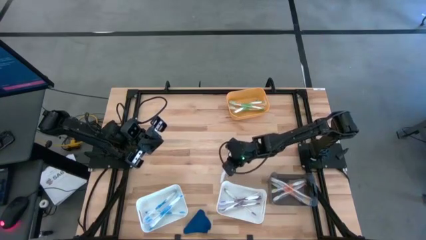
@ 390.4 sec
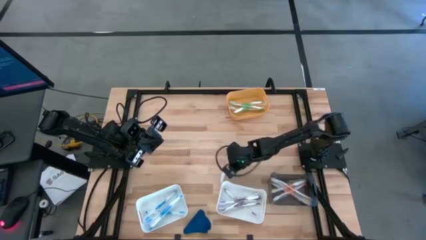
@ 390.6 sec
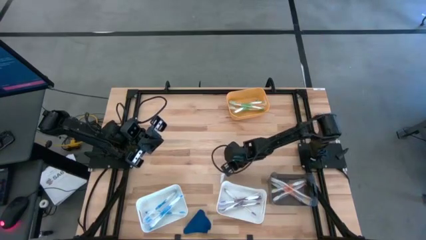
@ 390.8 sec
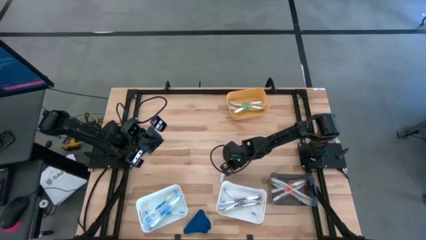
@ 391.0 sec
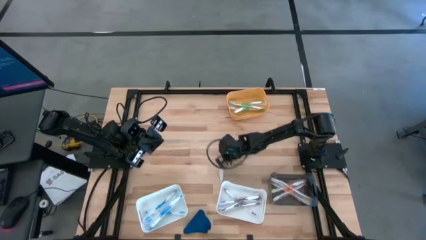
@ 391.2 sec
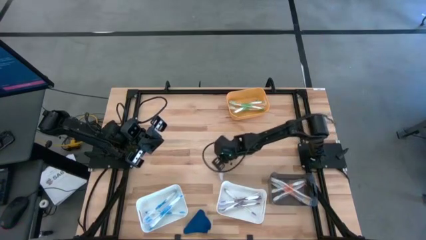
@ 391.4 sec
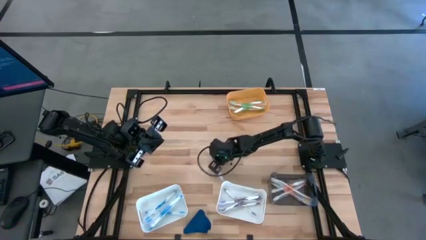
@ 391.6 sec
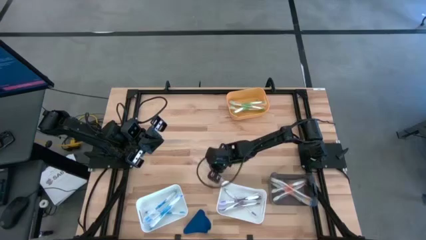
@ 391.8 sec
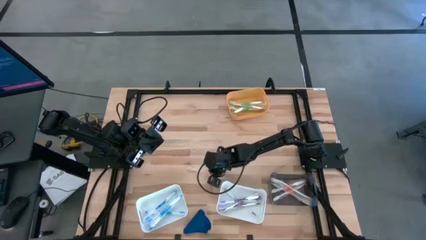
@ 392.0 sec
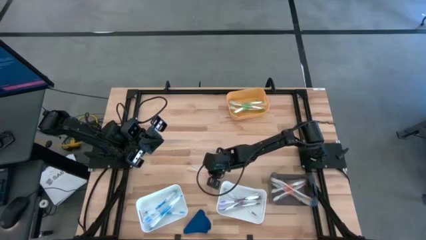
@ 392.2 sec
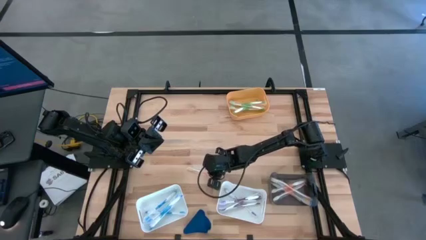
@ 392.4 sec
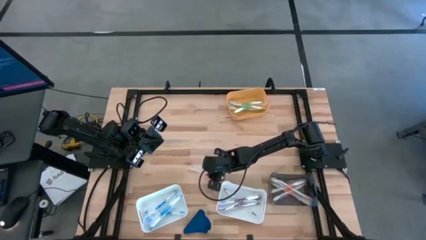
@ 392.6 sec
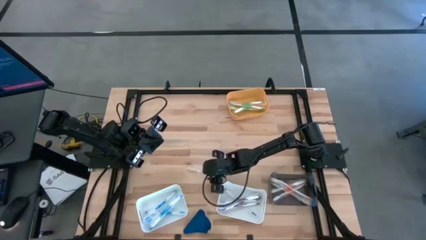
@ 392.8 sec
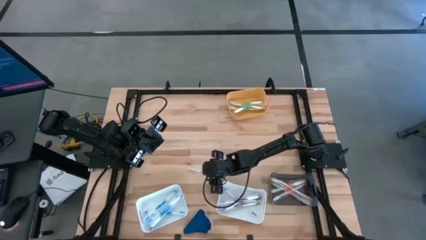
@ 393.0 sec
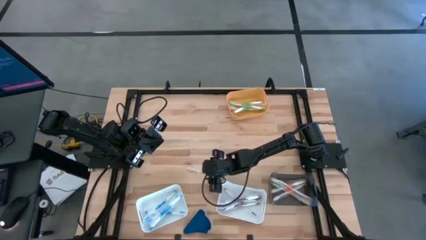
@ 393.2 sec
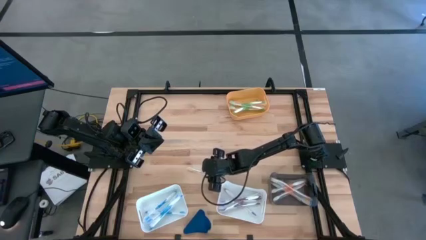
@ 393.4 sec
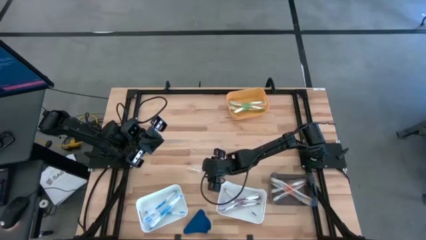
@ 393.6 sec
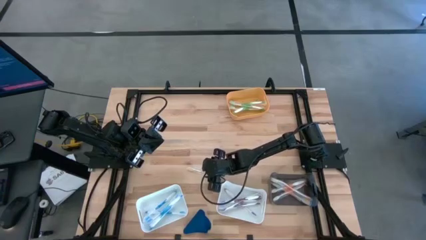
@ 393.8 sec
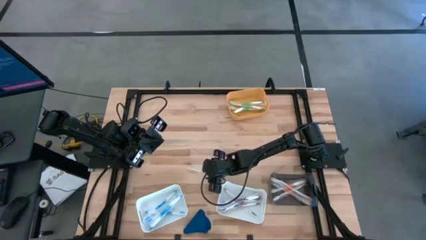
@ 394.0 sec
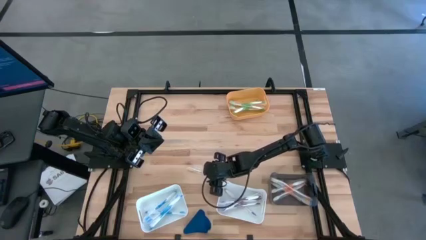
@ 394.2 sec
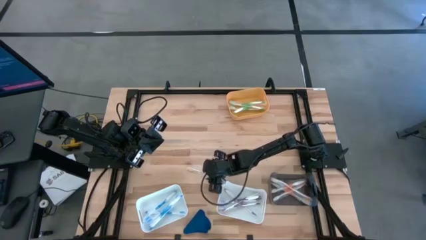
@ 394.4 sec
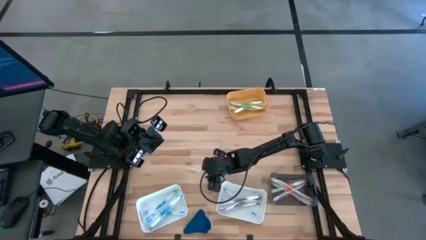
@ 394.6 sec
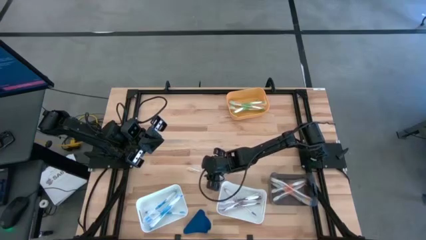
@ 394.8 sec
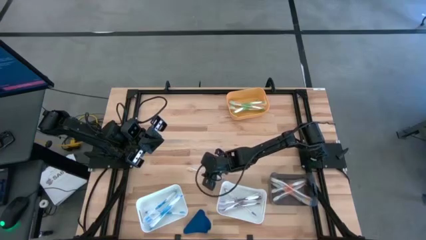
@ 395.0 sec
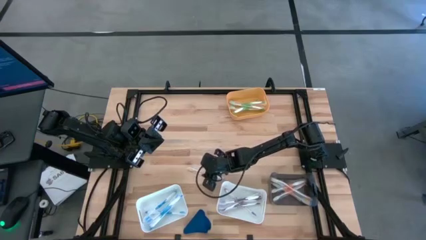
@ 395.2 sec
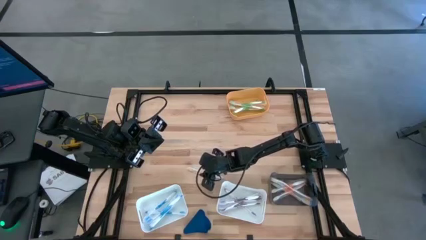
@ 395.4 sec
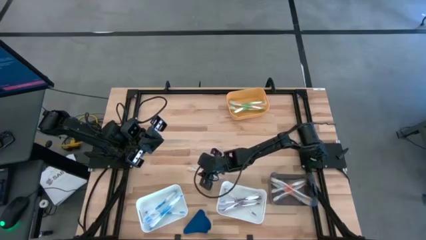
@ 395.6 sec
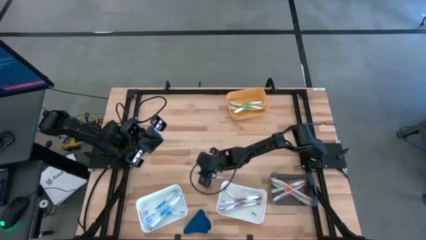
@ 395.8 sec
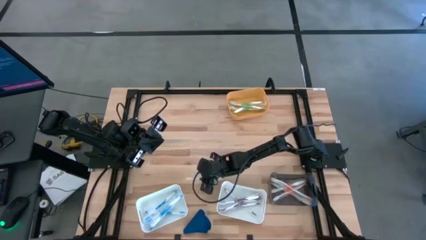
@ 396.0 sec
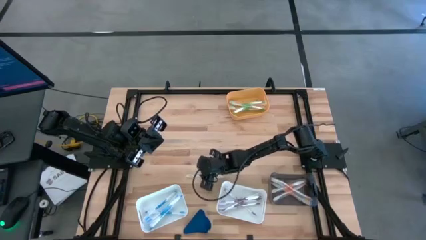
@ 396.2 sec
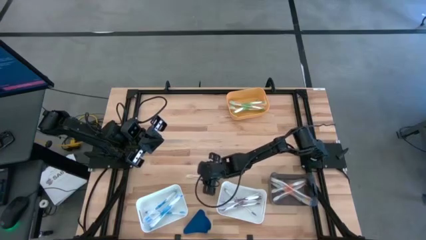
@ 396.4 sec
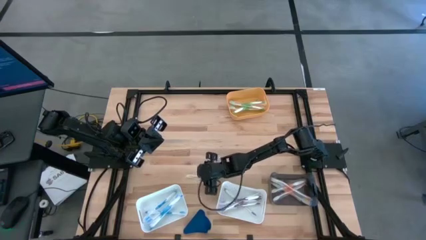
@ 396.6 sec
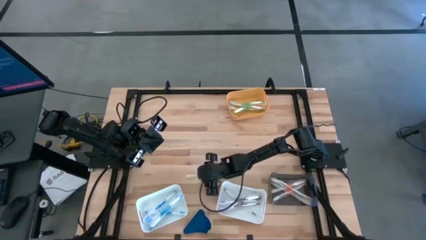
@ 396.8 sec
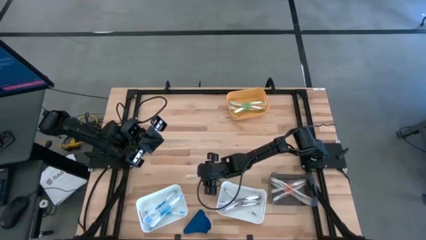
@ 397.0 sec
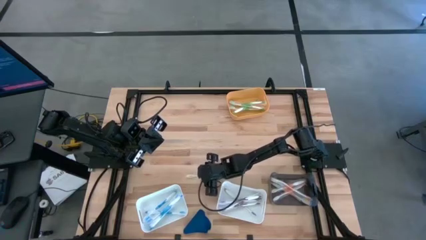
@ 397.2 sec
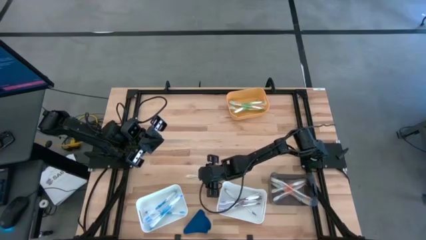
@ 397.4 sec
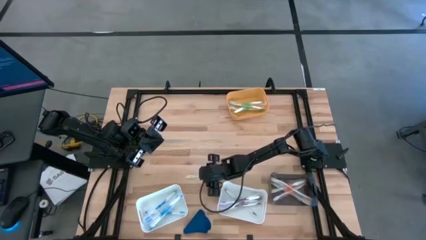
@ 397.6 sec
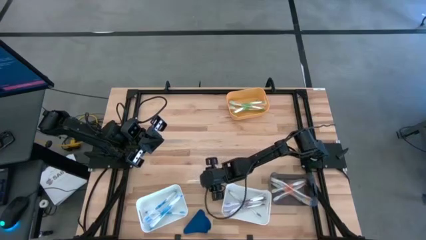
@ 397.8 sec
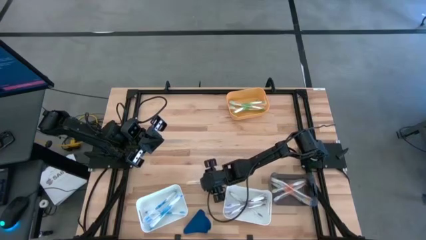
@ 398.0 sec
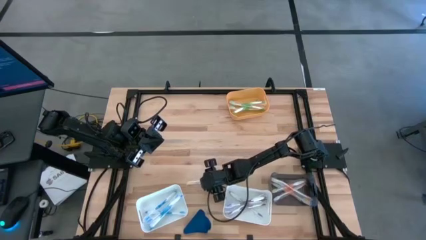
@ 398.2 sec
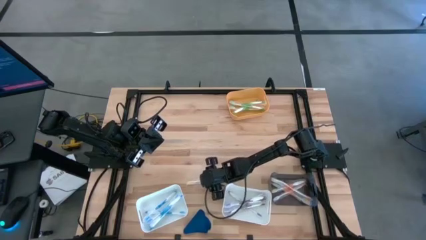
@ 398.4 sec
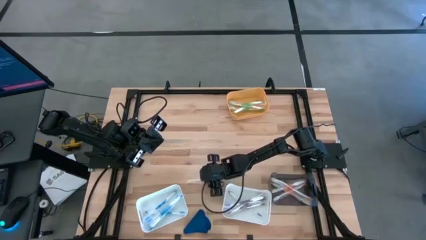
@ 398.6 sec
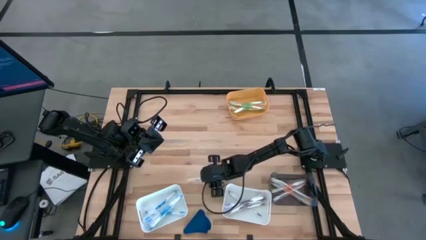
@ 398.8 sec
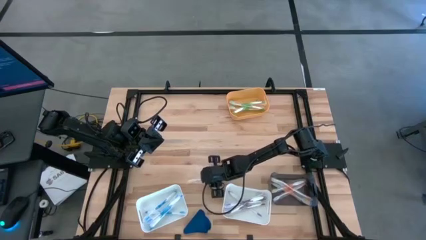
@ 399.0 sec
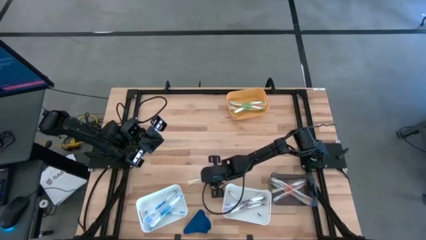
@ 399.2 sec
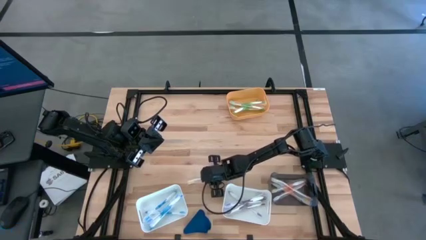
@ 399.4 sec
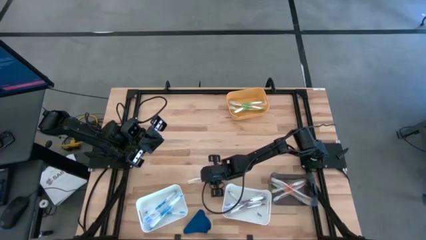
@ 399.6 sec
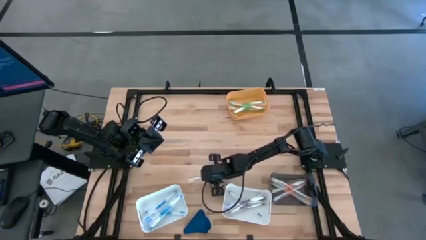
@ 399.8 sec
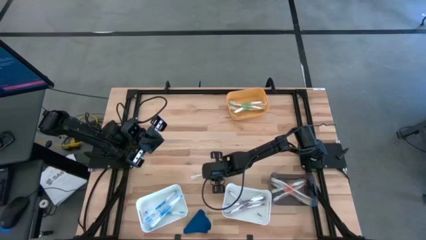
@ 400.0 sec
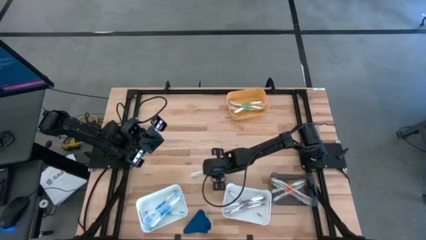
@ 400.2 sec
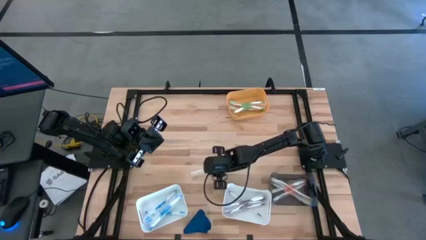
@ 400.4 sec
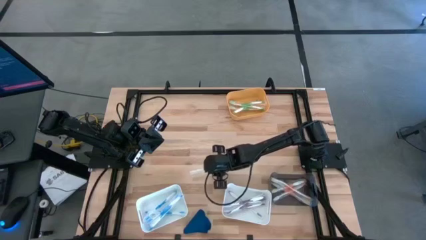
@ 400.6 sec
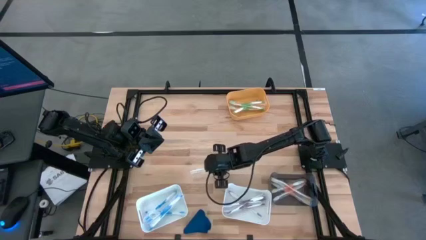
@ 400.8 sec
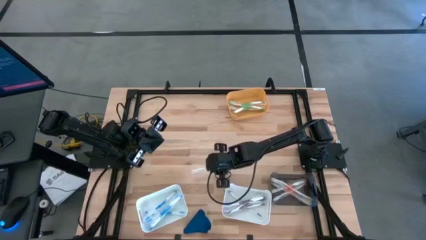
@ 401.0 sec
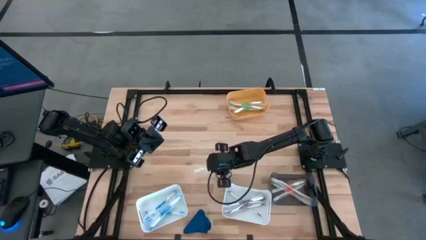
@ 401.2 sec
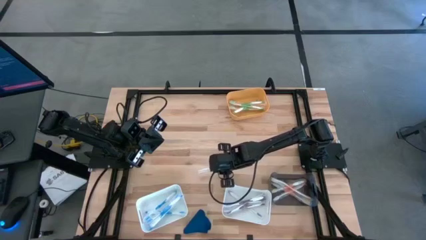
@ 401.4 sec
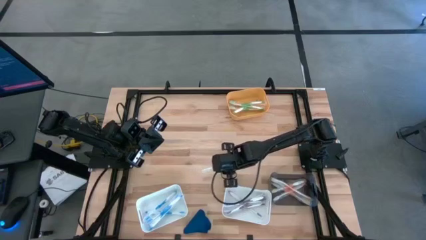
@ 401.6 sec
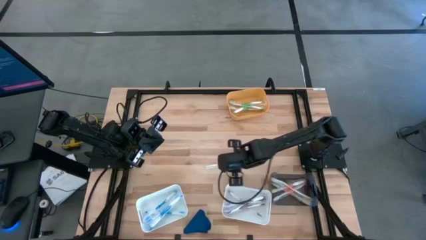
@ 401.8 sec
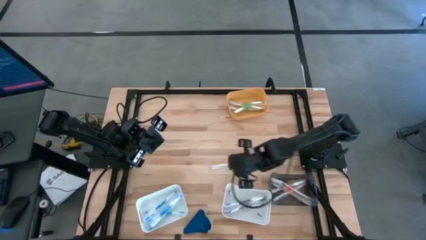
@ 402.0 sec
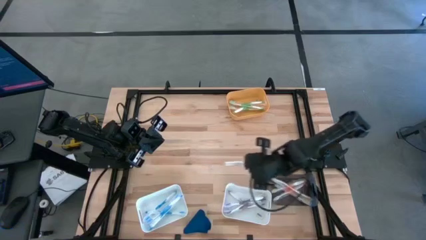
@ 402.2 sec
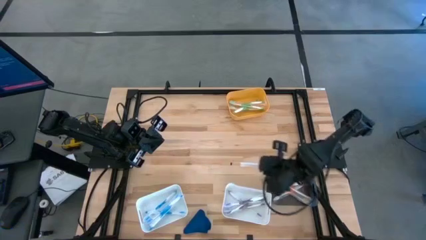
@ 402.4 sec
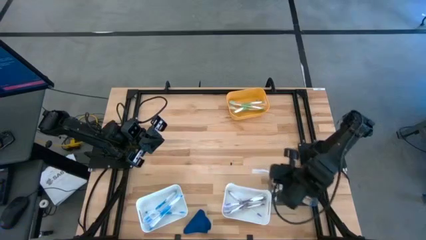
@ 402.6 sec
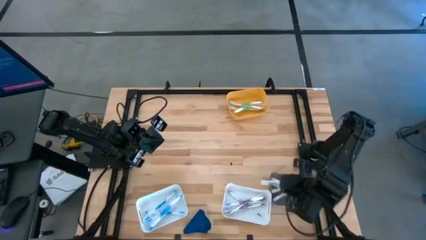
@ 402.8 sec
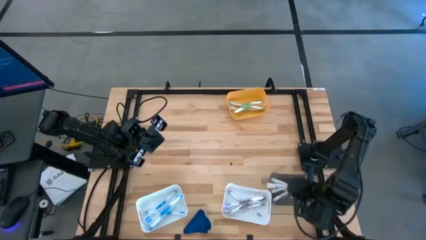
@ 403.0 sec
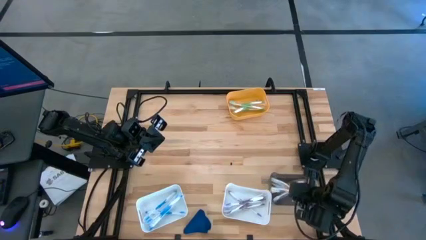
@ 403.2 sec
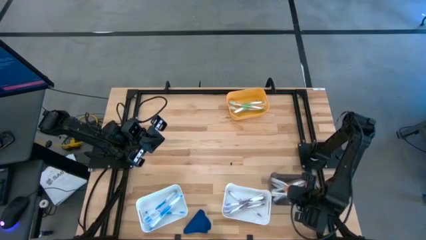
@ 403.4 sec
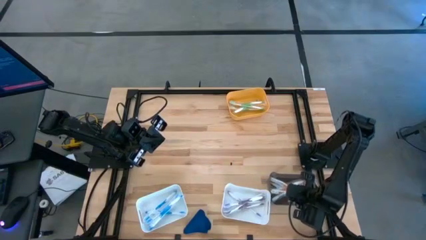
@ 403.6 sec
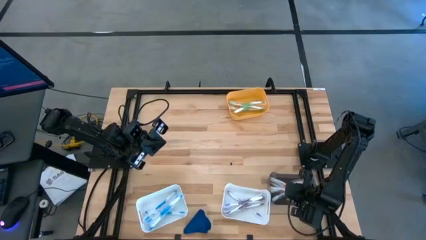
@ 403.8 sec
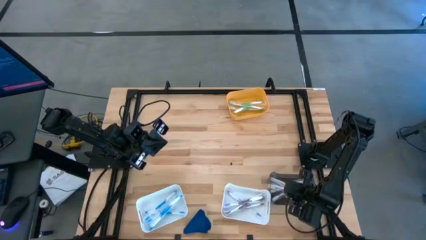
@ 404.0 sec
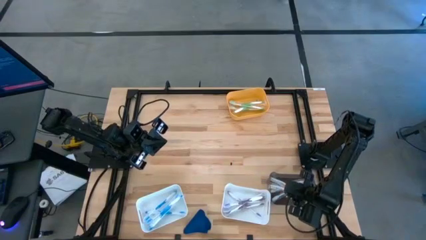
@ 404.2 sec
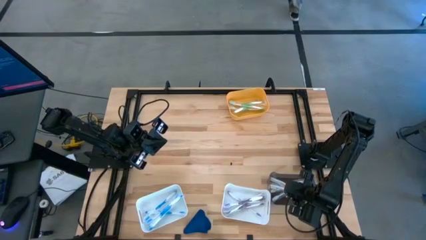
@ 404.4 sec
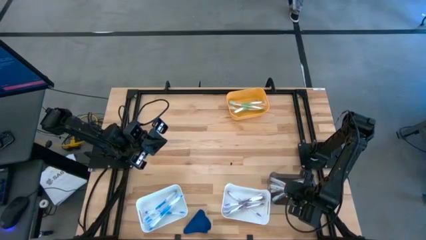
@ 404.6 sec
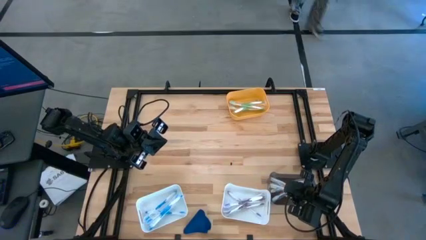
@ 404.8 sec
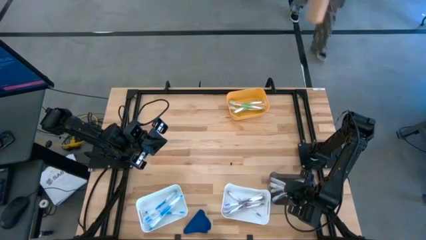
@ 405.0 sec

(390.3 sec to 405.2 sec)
Task: Pick & Place Toothbrushes
Put the orange toothbrush into the black bin
